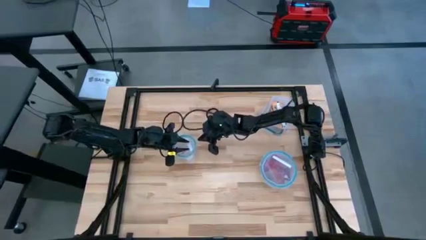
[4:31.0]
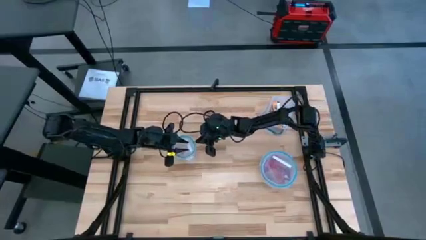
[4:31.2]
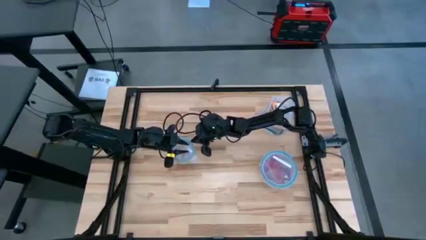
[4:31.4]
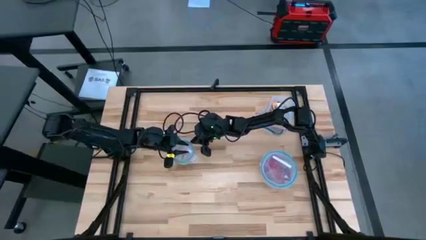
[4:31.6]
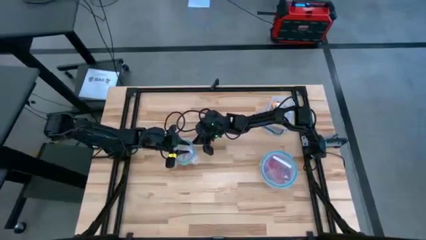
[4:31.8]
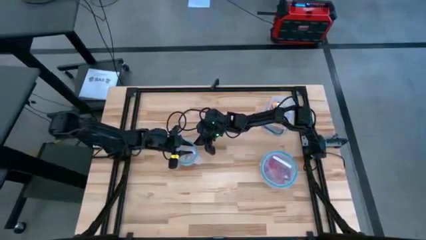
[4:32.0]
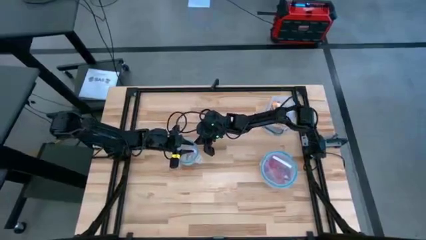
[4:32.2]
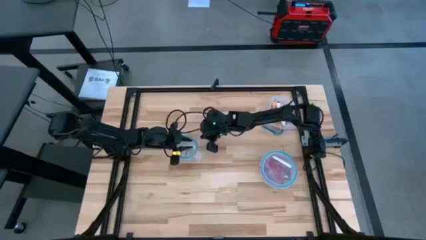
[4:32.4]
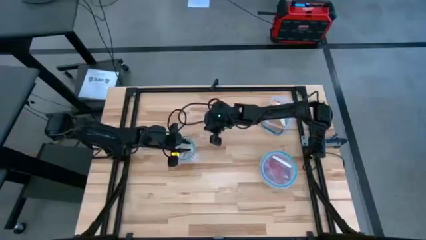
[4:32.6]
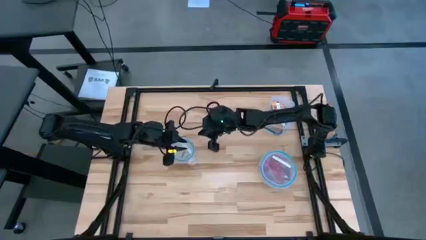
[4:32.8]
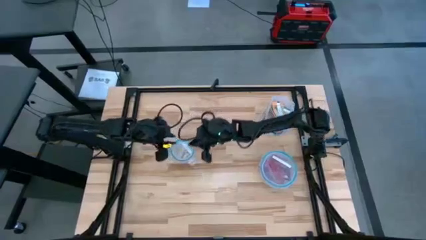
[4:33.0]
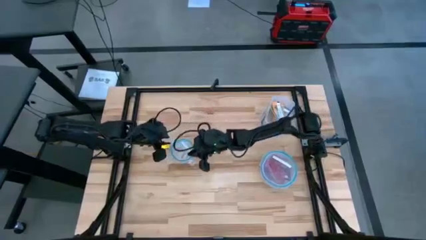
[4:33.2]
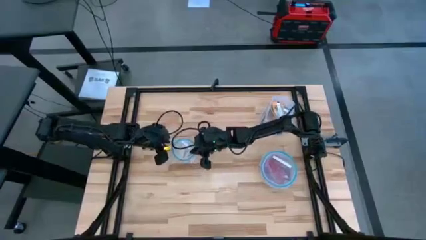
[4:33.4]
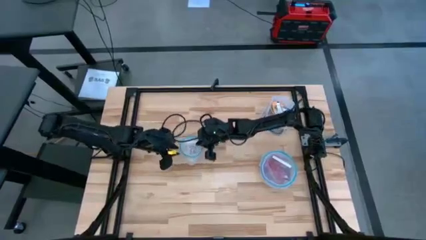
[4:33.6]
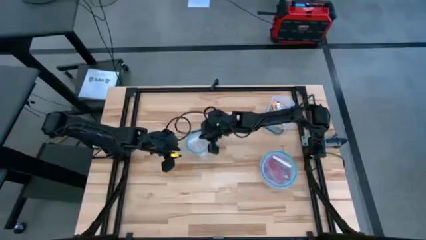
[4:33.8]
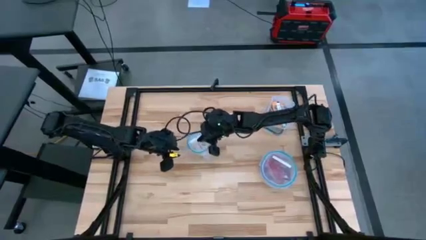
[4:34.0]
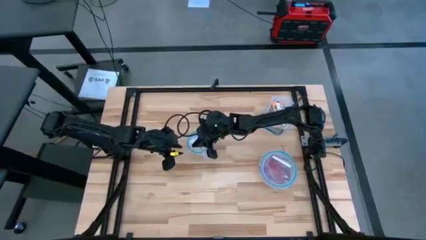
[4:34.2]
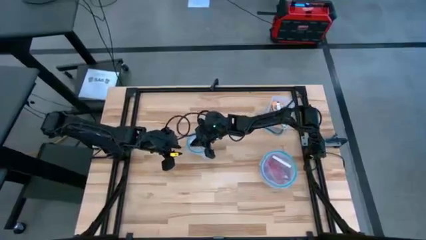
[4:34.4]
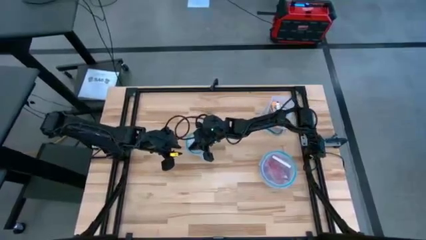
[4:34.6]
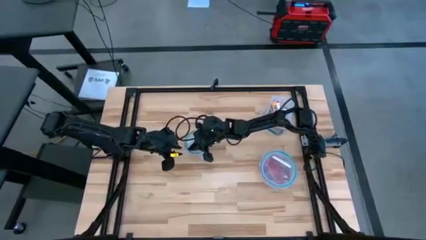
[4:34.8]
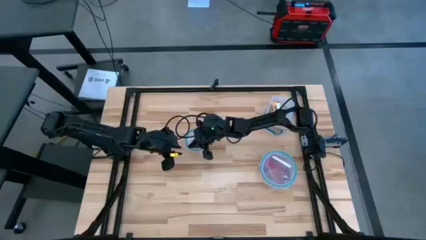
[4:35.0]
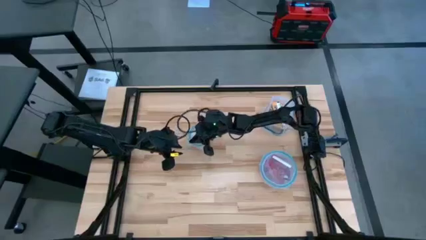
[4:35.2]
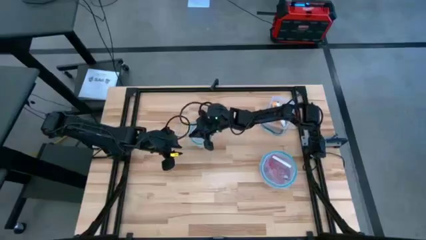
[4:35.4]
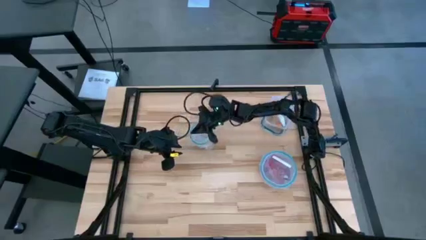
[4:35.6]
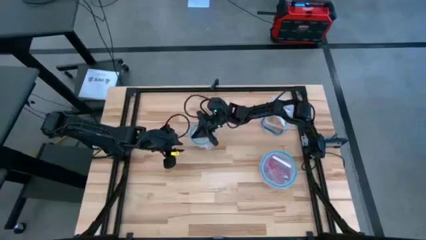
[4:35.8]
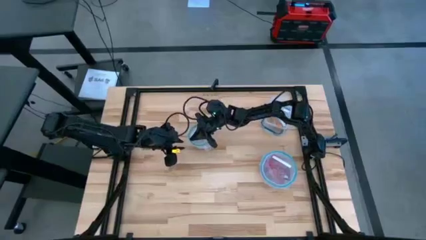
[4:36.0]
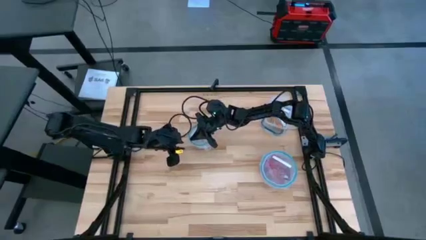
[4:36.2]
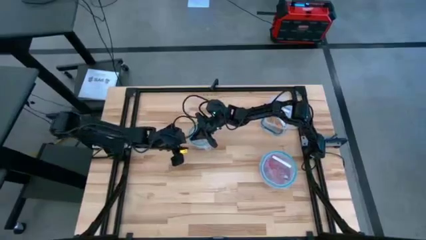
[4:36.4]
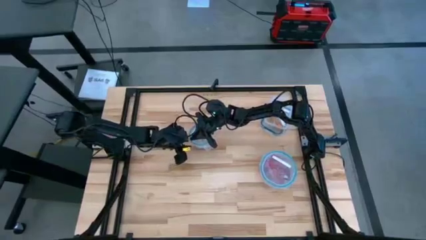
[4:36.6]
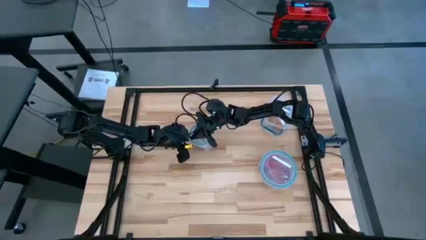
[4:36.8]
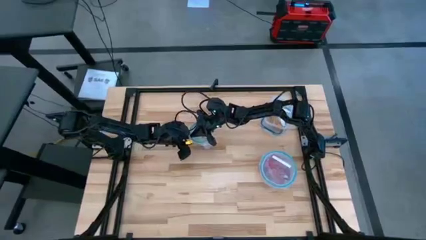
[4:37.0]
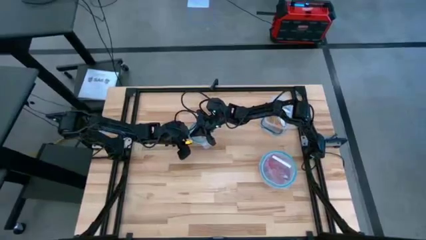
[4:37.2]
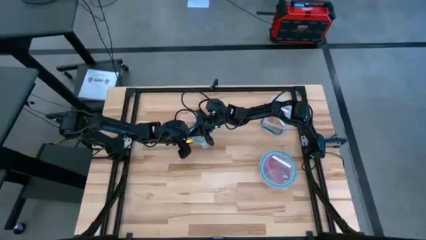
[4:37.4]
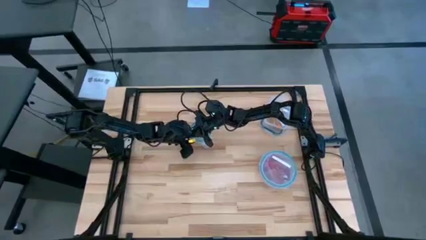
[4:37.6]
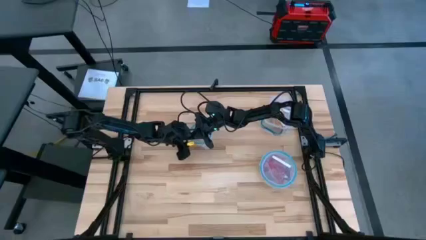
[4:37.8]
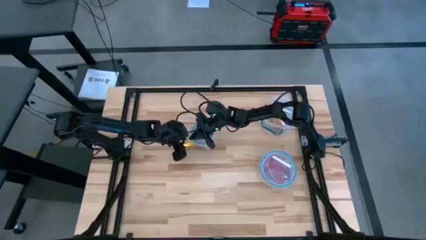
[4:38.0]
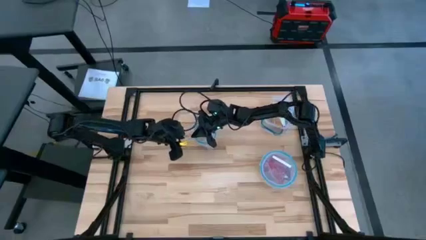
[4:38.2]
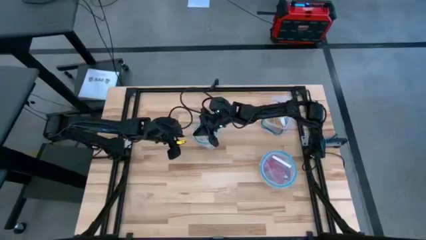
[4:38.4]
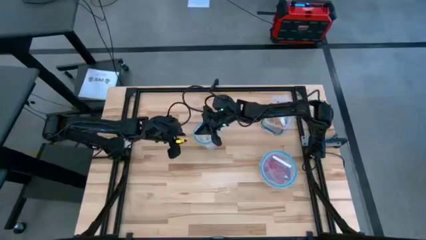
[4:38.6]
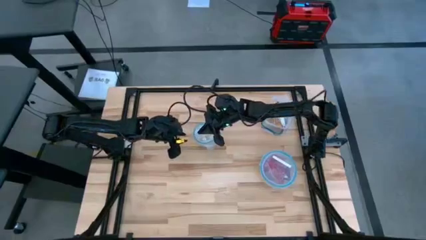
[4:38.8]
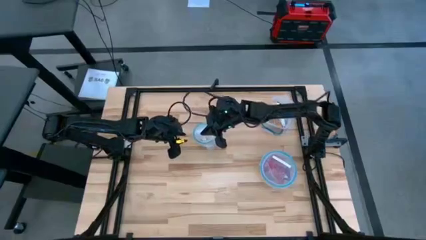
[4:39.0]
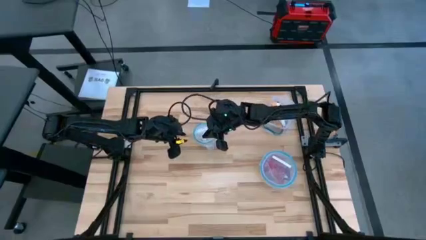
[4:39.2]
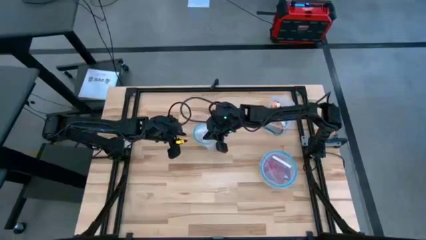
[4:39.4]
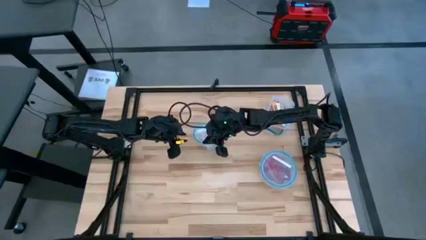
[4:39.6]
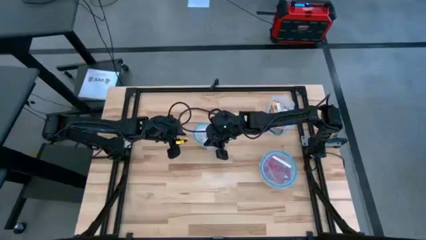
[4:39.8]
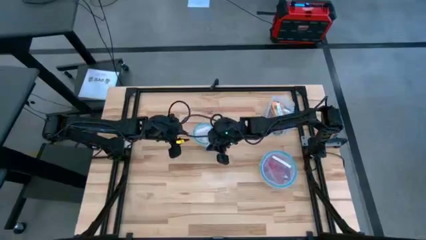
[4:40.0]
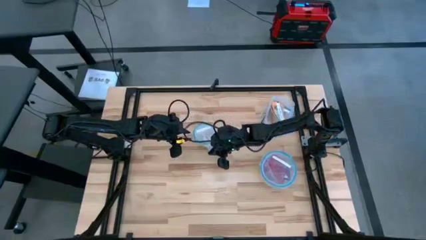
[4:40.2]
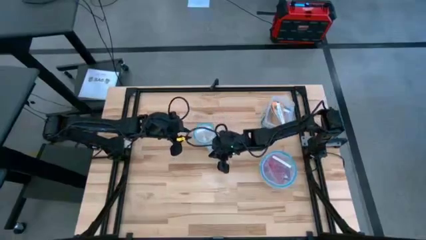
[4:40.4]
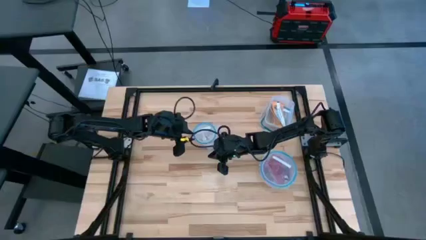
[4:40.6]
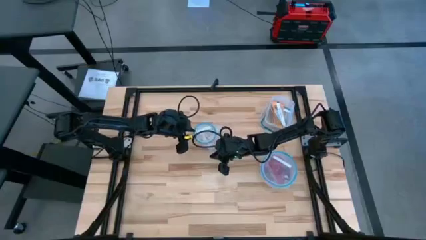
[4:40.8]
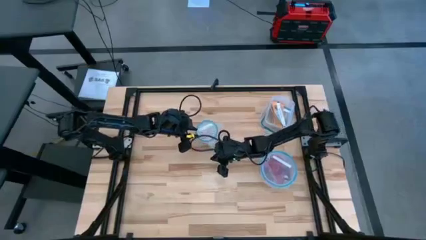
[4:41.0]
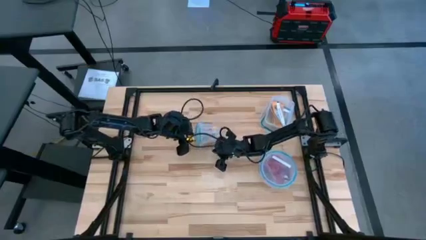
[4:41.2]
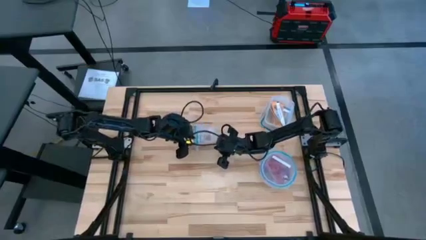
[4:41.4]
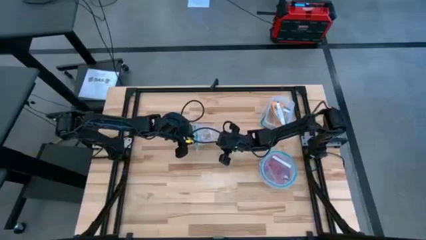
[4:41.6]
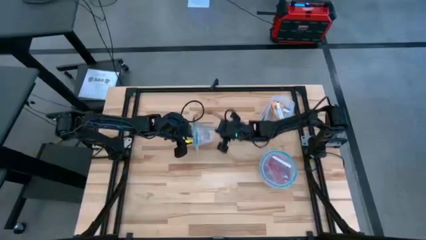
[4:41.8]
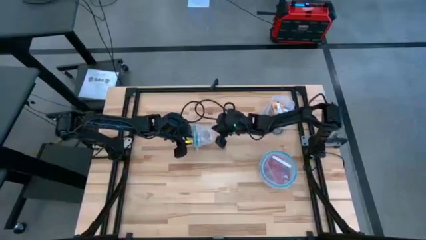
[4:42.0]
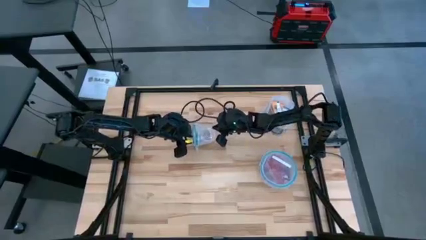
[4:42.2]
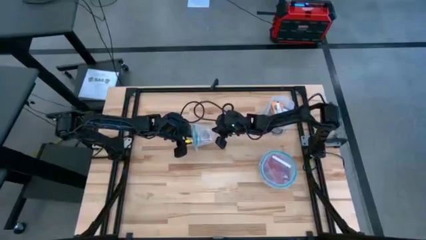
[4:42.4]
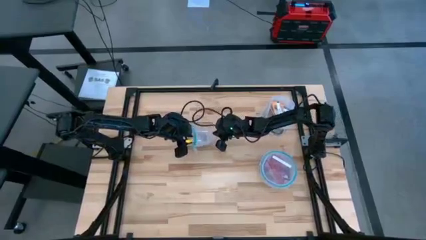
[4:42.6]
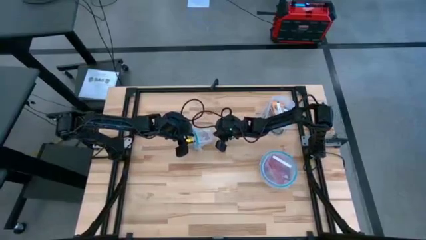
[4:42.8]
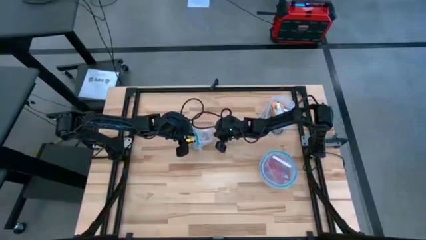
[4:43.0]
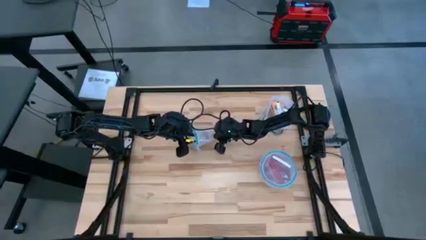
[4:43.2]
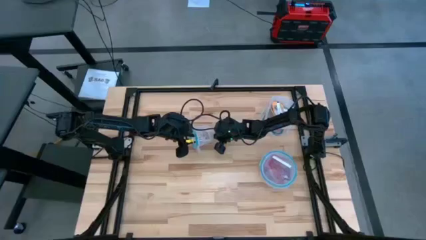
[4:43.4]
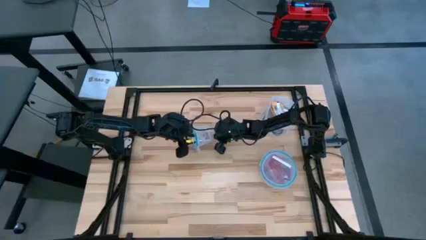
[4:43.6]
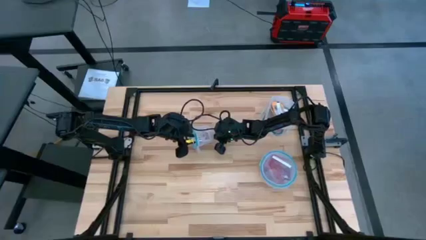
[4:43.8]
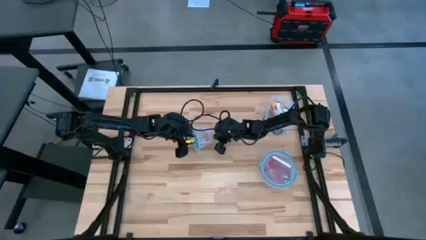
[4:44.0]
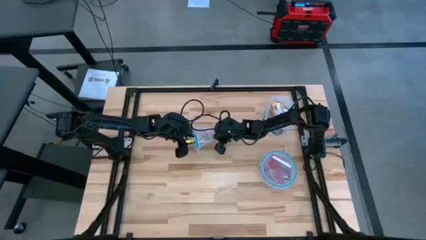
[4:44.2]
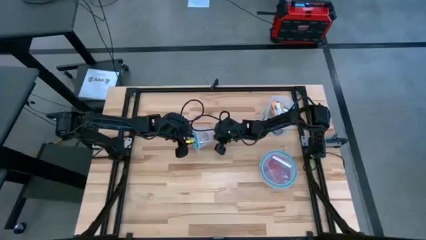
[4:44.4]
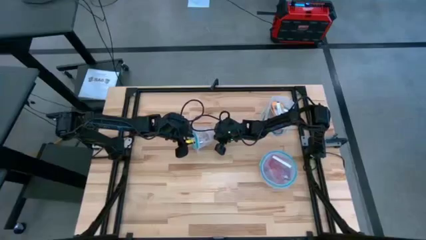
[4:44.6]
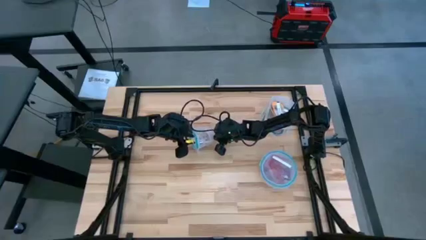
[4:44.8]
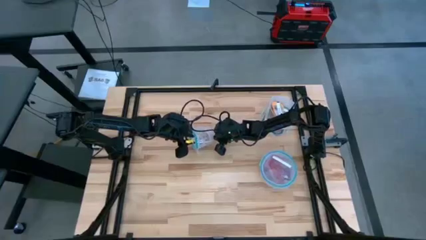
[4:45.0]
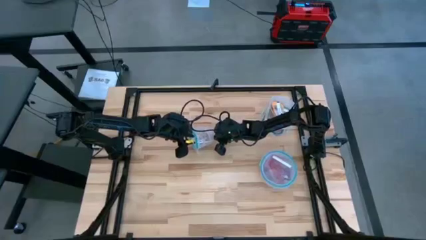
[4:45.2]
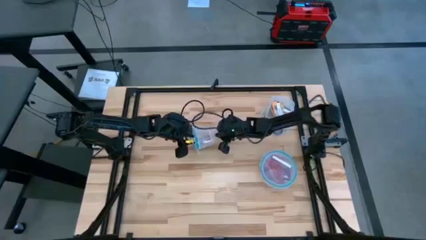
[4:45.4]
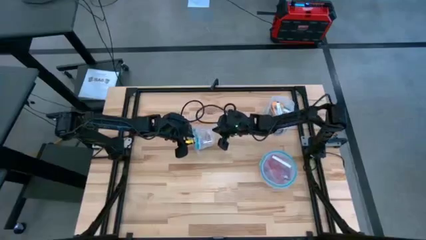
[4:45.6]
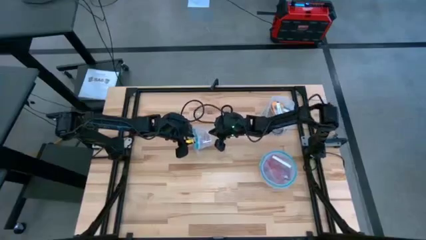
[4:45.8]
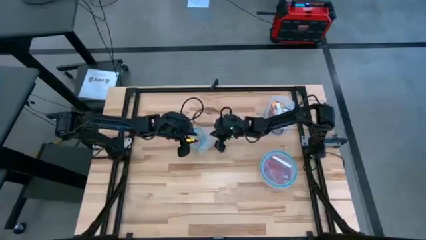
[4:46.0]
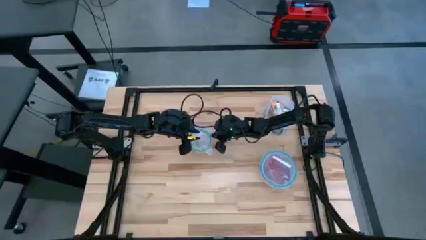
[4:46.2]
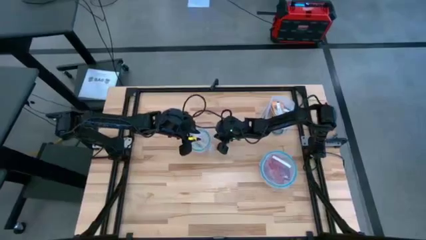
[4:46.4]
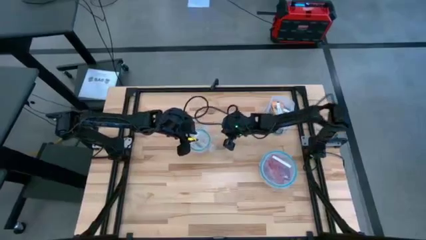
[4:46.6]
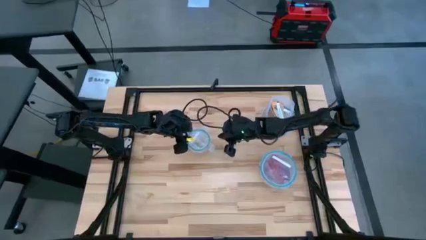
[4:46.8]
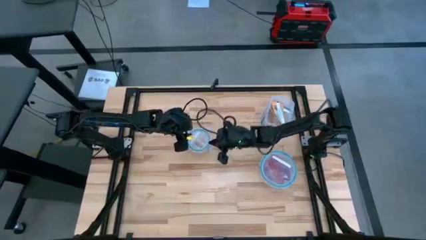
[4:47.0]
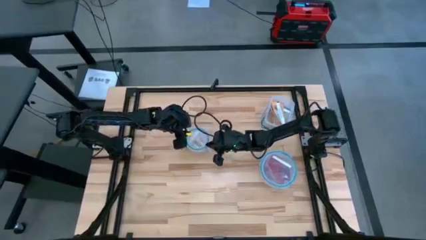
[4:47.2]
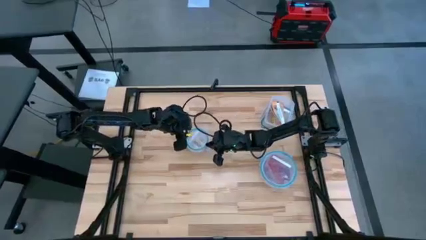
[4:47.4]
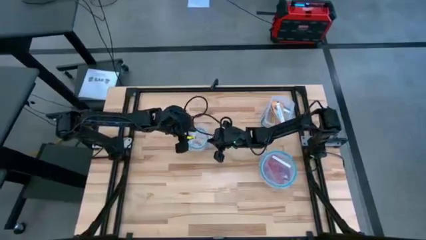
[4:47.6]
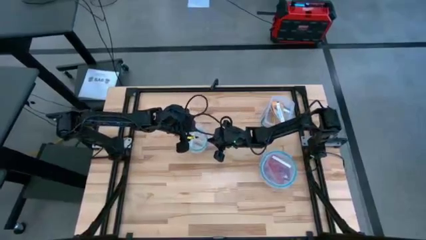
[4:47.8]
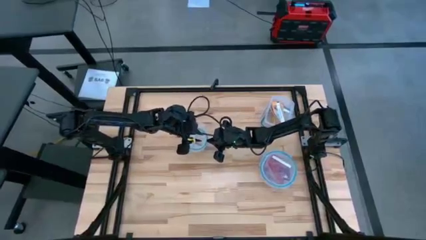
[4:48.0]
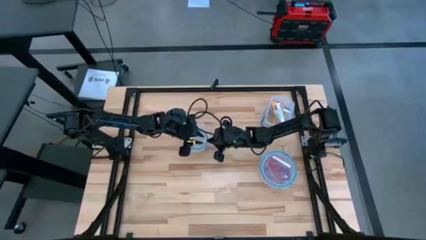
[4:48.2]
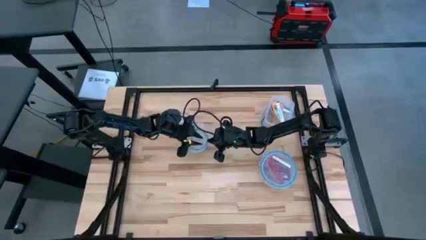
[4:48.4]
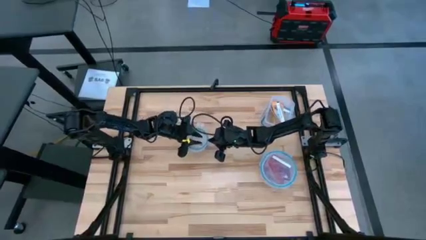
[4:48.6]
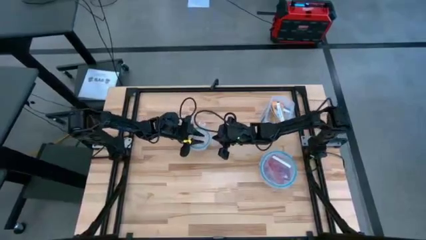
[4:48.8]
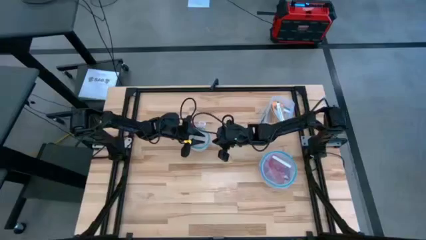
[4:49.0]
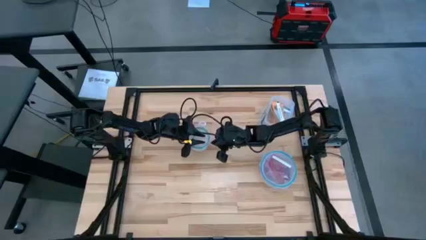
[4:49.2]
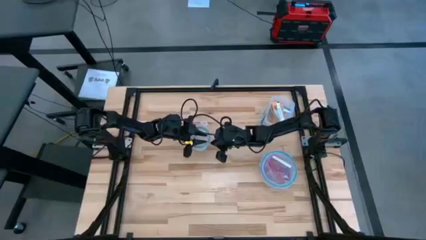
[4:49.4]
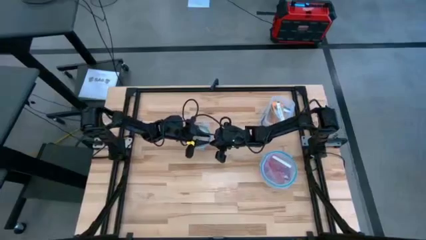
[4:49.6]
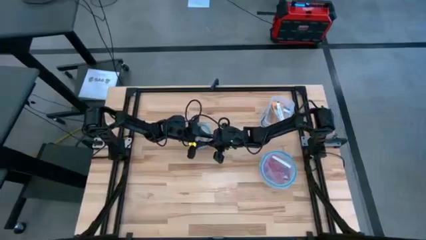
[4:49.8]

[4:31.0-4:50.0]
Task: Sort candy
Close the small round transparent bin
